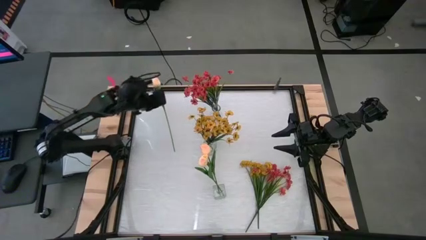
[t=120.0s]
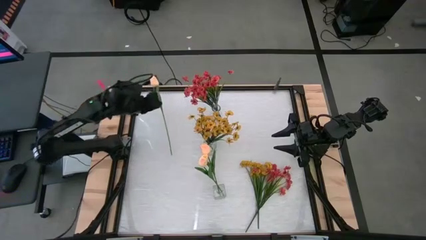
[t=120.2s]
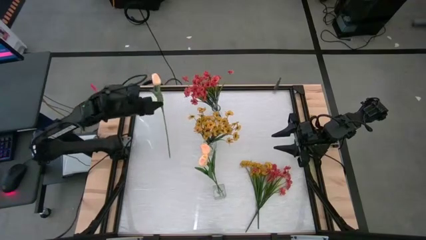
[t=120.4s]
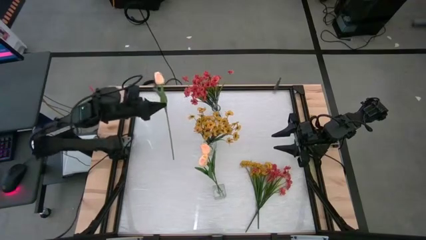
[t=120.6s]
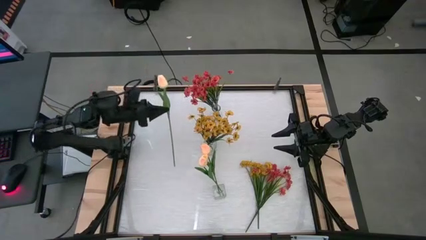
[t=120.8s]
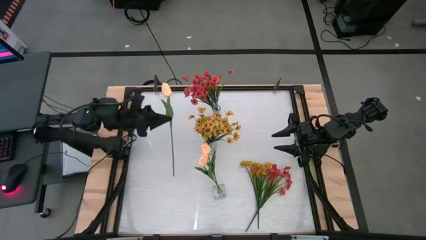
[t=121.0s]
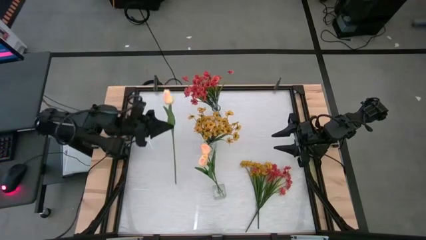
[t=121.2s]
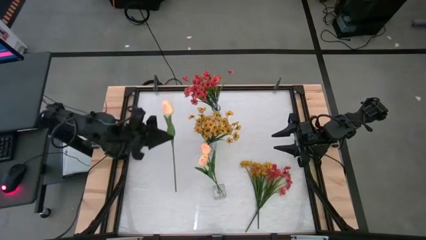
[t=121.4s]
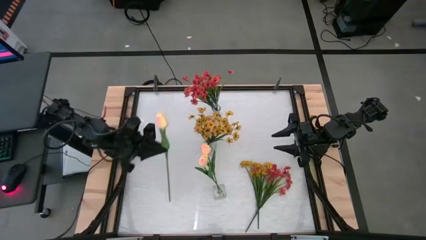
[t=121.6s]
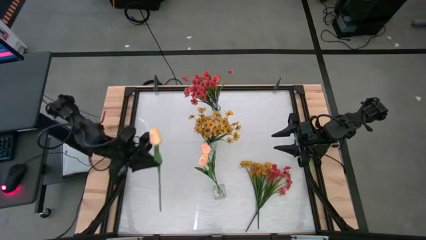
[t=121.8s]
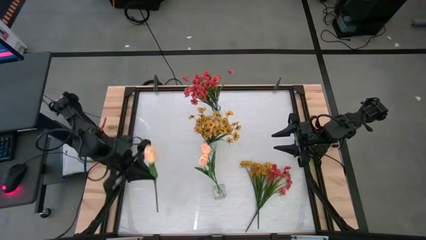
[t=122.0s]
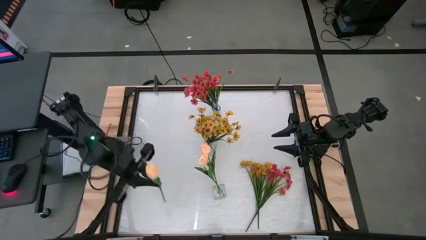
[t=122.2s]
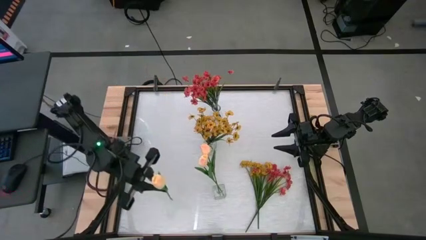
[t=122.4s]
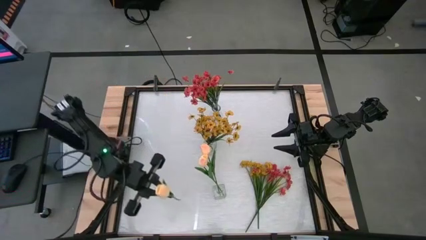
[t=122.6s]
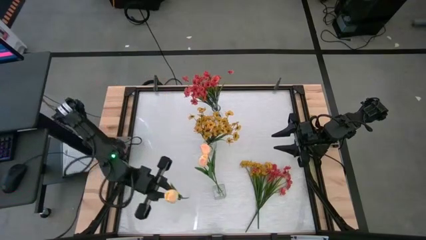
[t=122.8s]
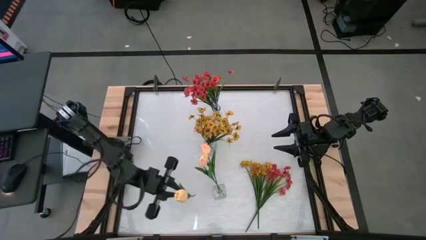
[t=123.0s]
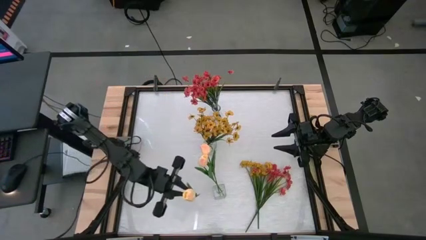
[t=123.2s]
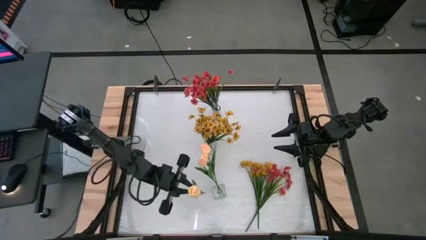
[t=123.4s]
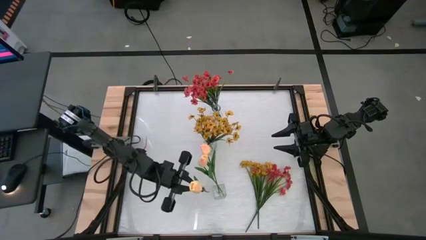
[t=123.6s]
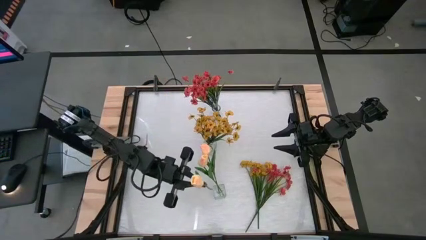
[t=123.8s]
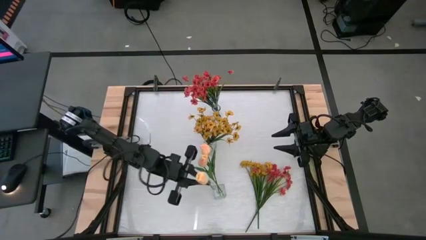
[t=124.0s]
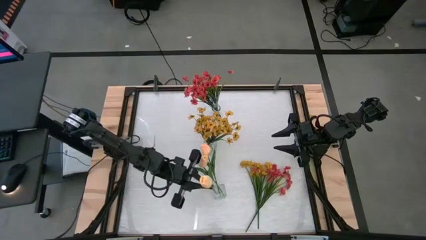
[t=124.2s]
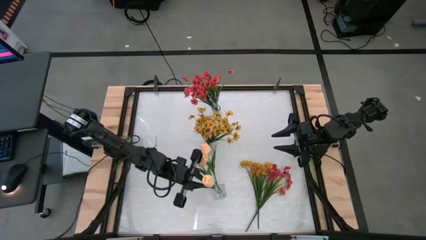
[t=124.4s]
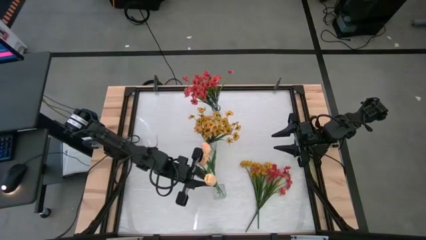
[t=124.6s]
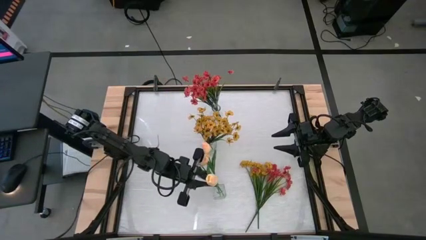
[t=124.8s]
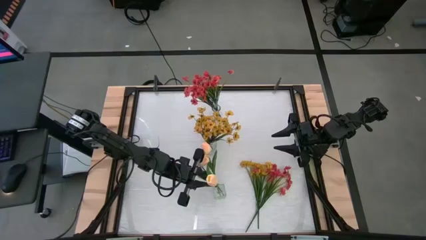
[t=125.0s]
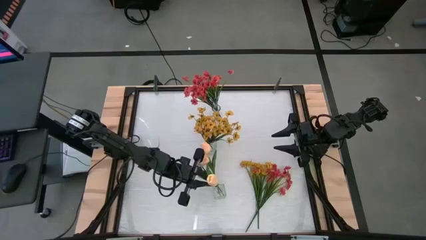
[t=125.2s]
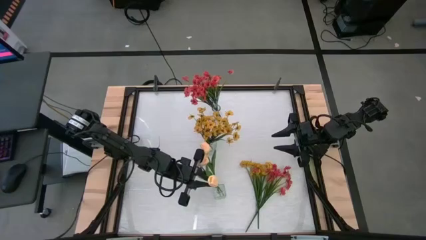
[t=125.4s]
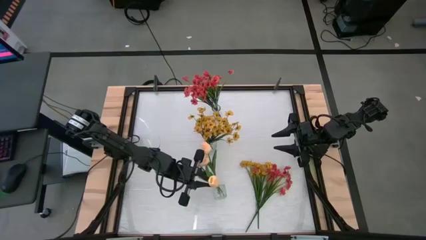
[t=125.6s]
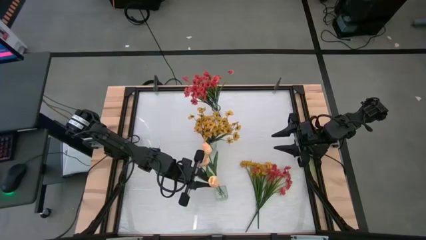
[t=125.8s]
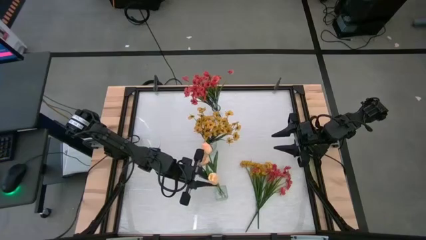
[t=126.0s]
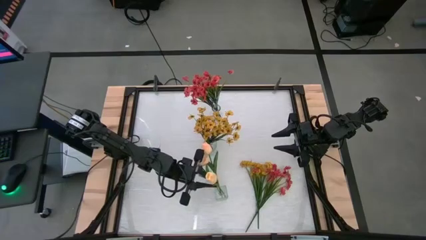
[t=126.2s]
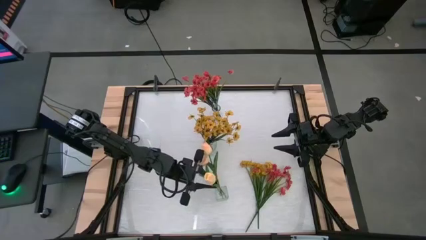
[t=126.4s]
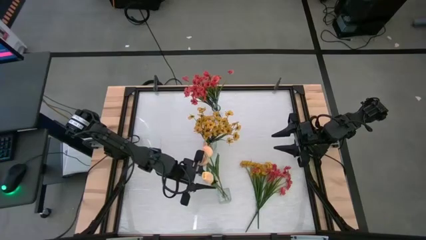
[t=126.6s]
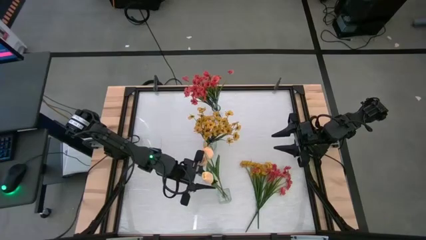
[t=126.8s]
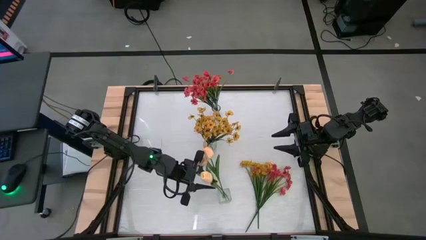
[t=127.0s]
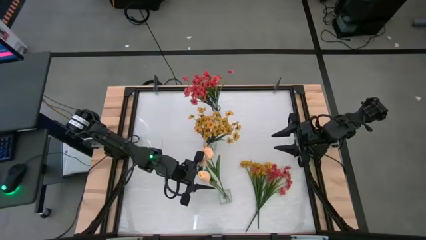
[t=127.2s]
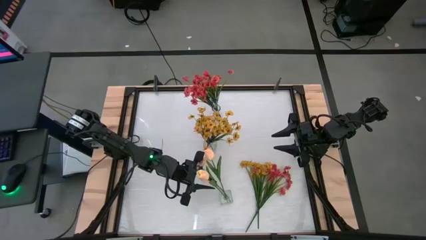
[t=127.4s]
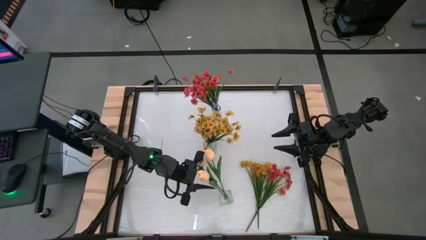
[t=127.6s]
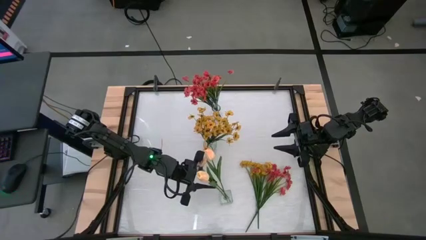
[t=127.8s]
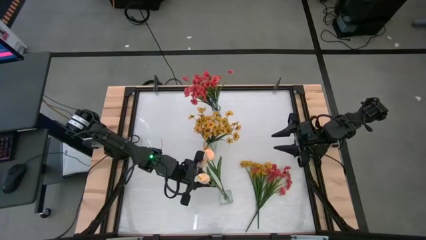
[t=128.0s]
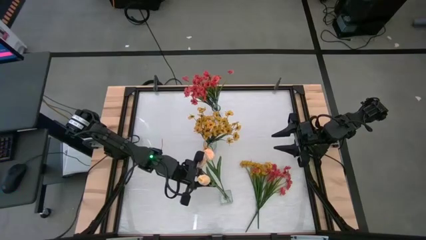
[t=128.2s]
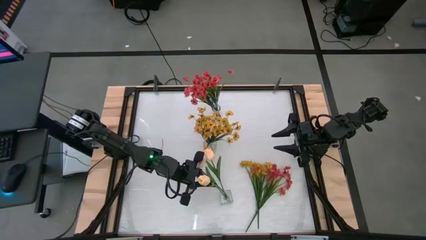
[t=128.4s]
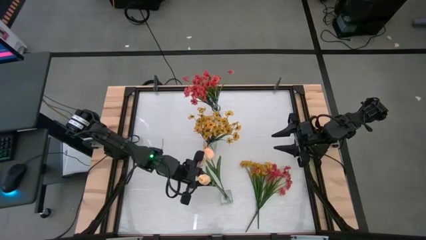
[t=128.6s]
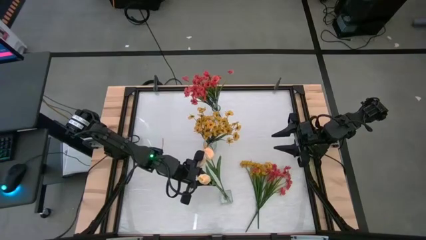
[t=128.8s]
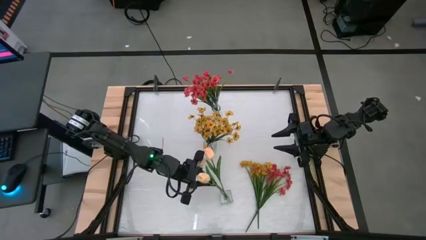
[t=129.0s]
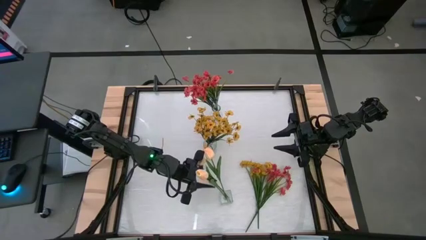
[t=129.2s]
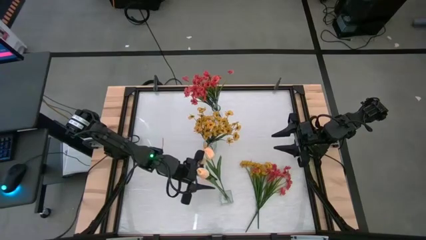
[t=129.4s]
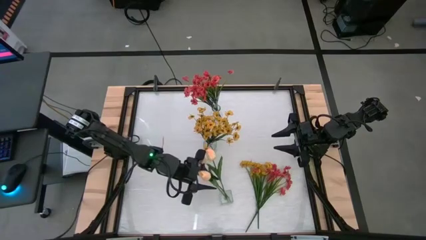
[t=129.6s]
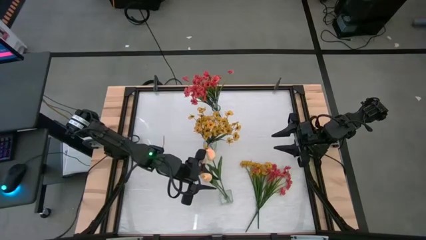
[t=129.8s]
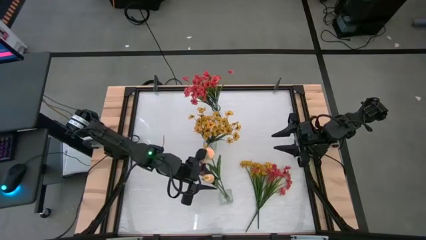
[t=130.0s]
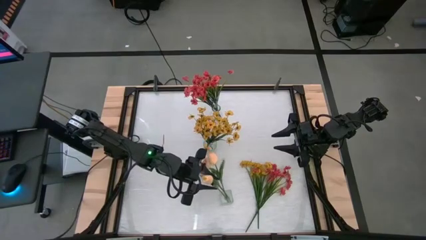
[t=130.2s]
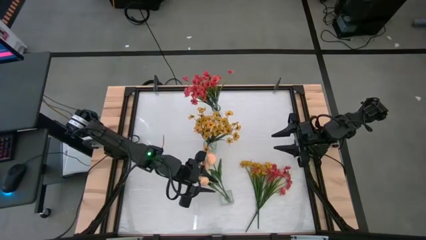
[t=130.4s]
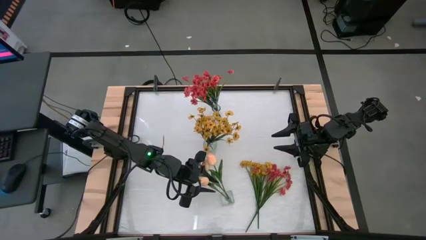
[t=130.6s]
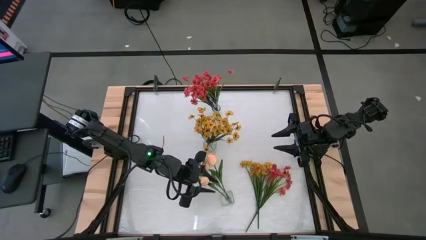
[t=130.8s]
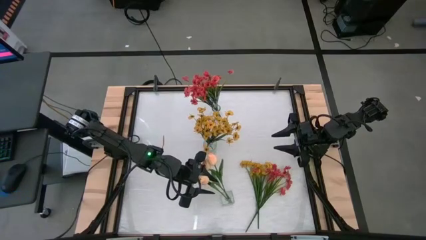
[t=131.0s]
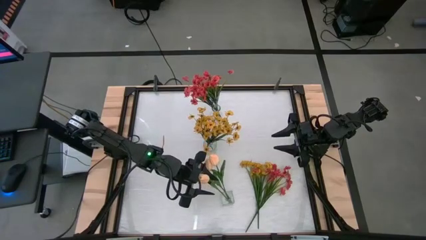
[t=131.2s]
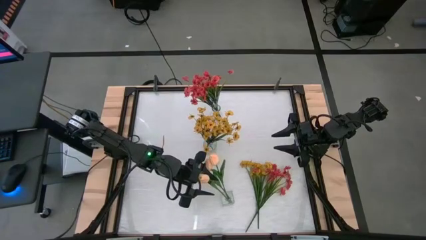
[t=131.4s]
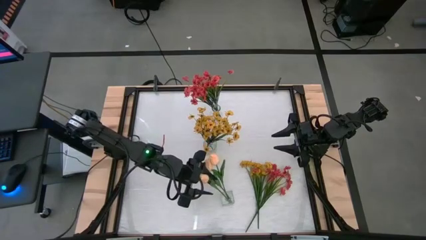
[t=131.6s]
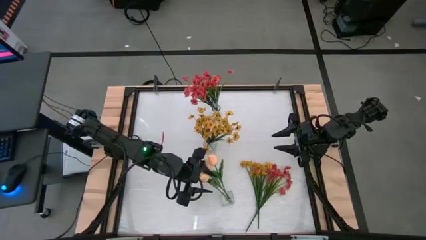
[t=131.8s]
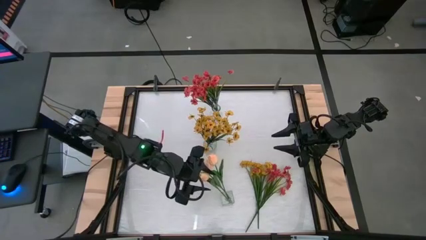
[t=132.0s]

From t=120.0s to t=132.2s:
Task: Sort flowers into vase by color
Put the orange flower into the bottom transparent vase

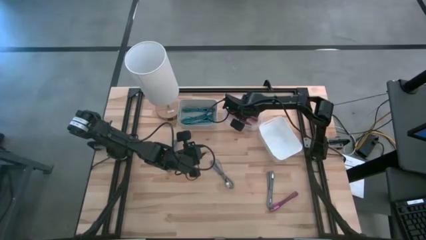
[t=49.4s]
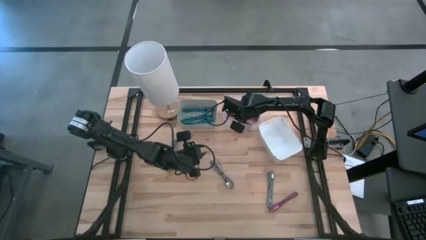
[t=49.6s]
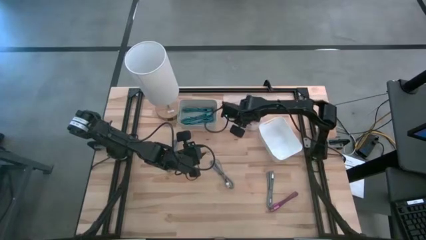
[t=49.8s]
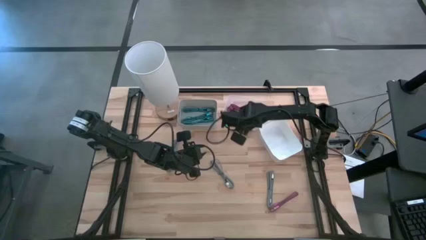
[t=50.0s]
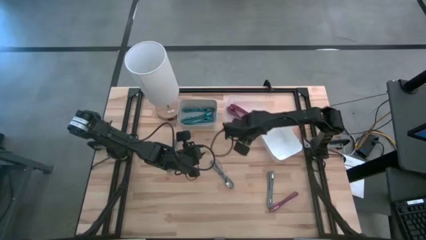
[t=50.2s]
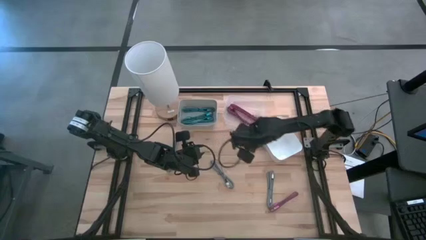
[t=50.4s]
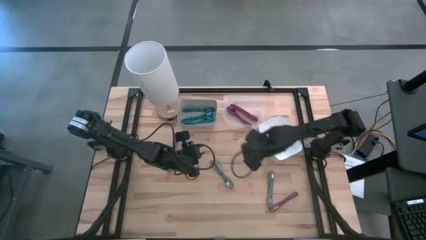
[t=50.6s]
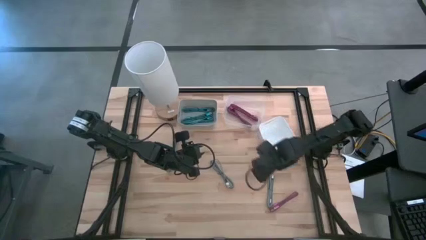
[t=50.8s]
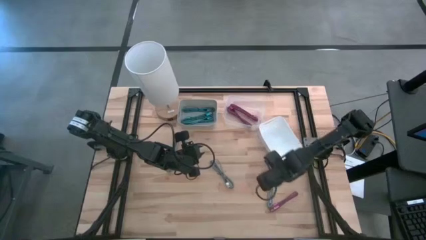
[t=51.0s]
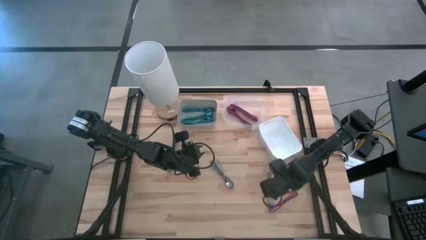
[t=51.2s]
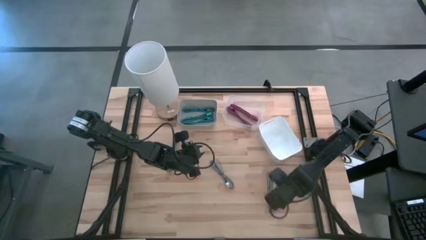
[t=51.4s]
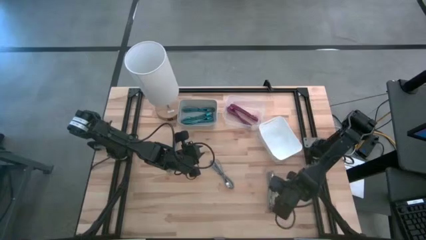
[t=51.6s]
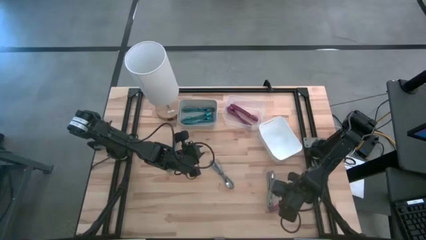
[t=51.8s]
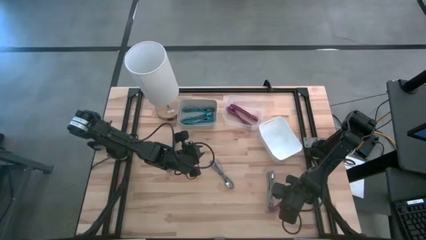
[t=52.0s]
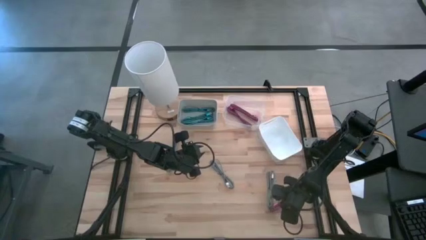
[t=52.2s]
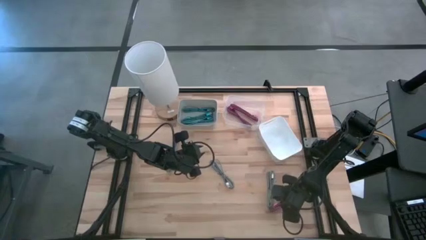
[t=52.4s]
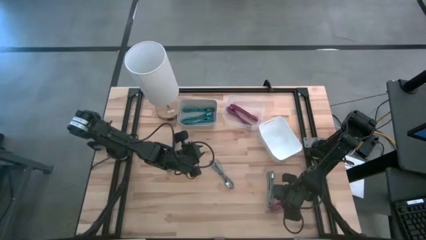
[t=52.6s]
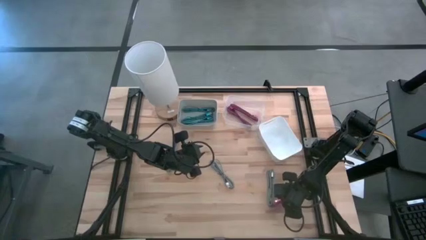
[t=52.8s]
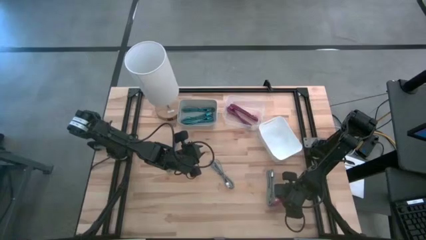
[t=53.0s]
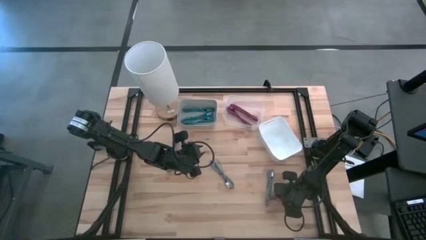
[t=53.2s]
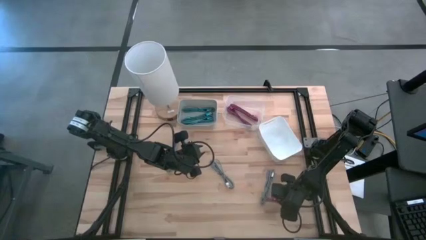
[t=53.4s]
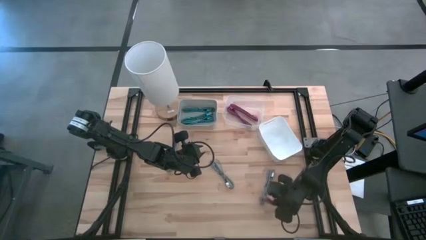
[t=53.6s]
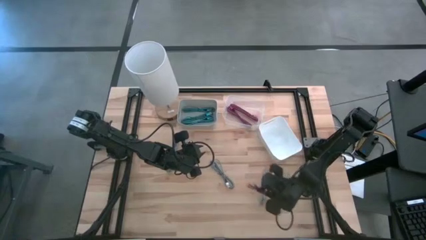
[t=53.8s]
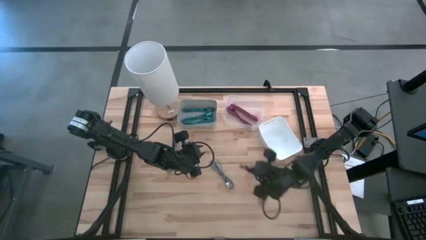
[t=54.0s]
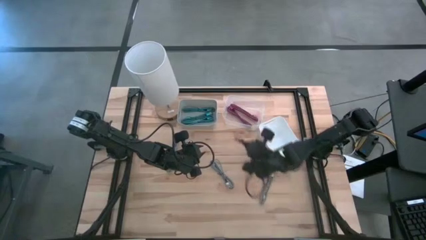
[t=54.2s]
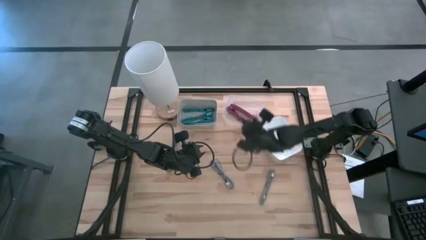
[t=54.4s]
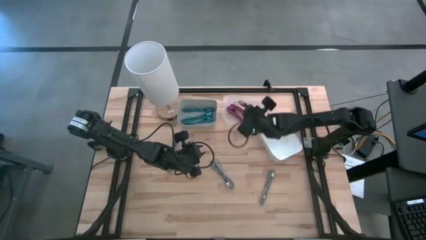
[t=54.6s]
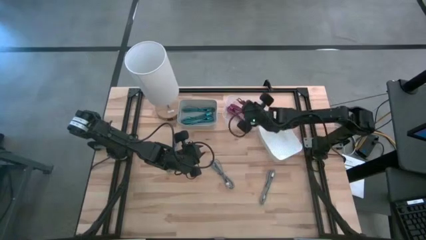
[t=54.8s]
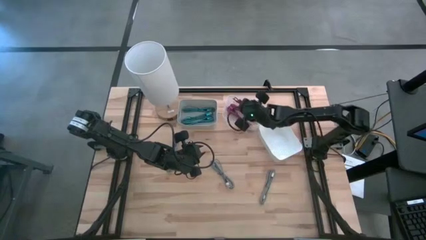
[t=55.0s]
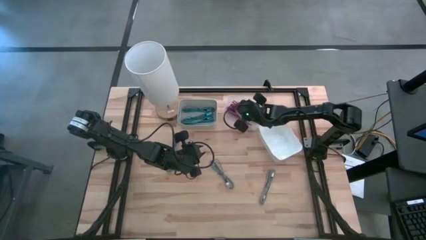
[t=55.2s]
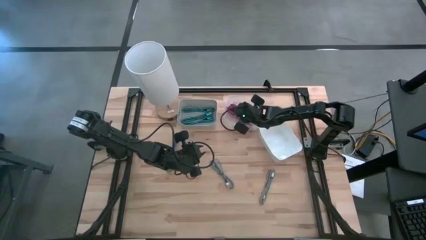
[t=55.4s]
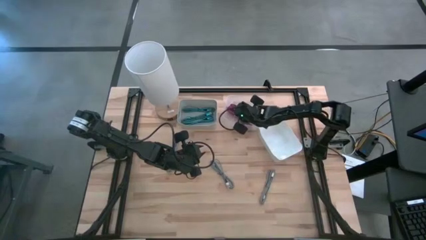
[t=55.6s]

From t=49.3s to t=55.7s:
Task: Pick & Place USB Port
Put the black and pink USB cable into the transparent bin
